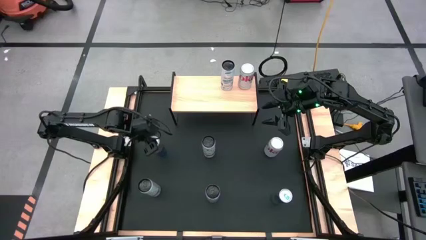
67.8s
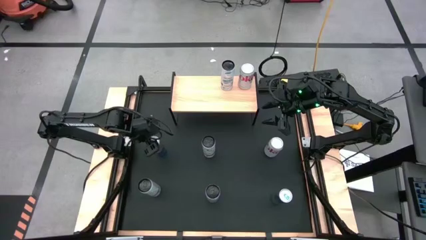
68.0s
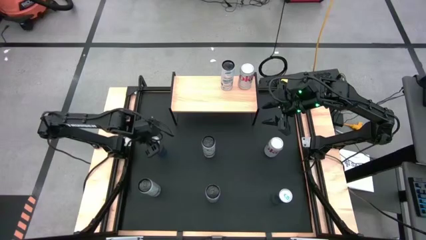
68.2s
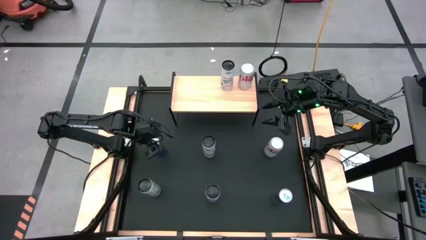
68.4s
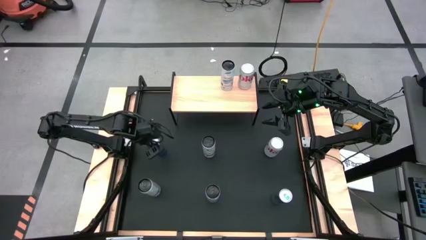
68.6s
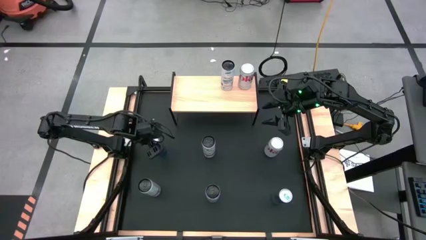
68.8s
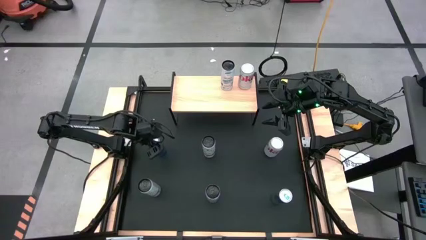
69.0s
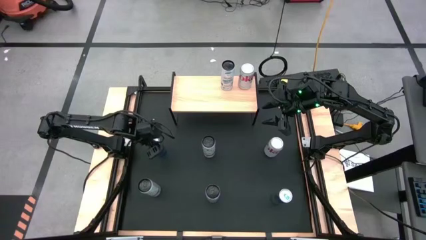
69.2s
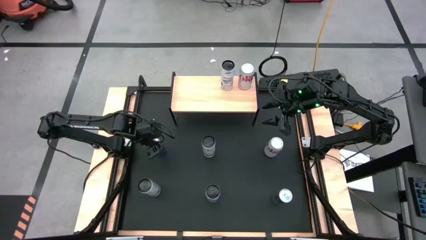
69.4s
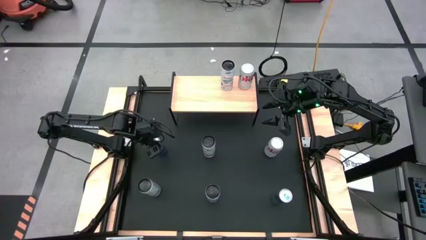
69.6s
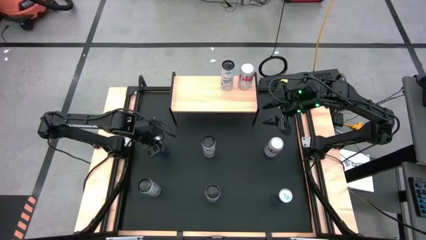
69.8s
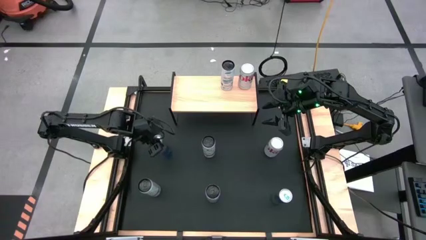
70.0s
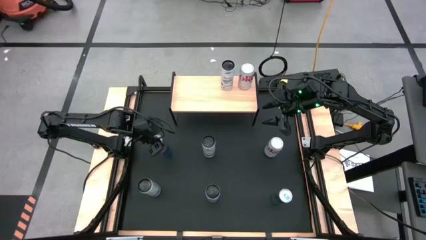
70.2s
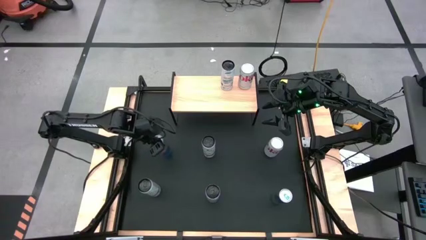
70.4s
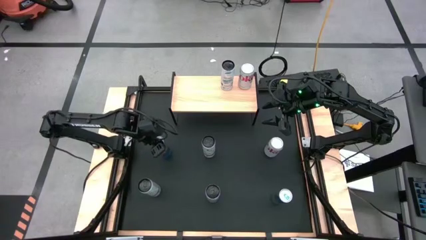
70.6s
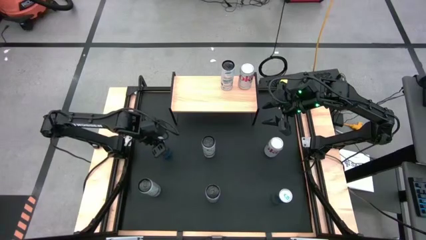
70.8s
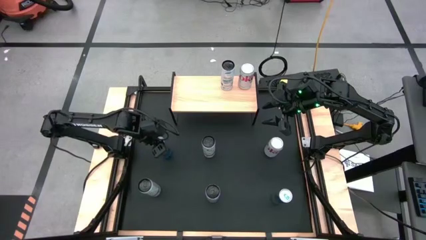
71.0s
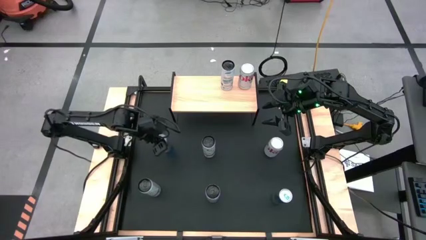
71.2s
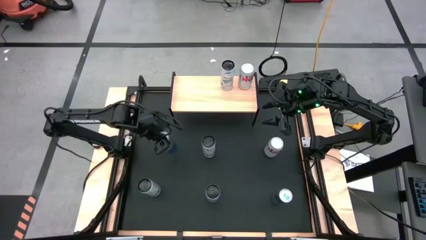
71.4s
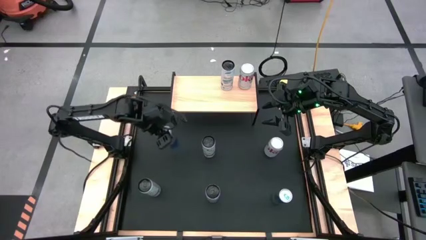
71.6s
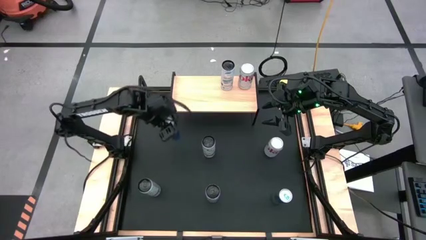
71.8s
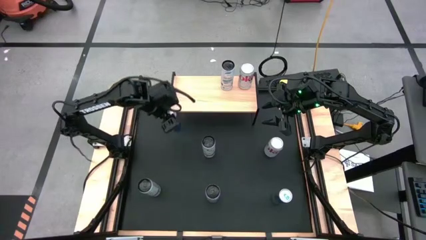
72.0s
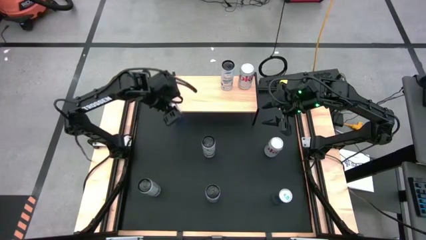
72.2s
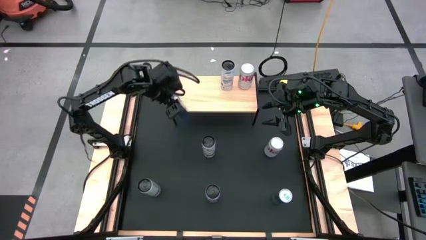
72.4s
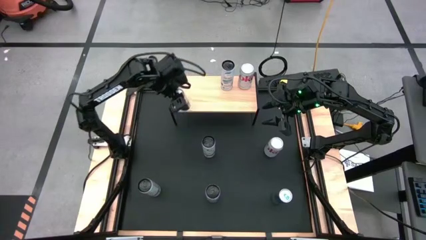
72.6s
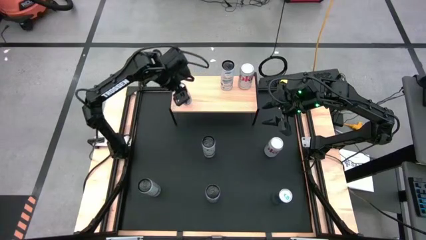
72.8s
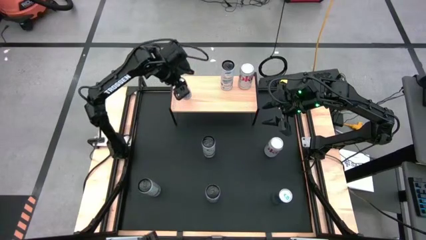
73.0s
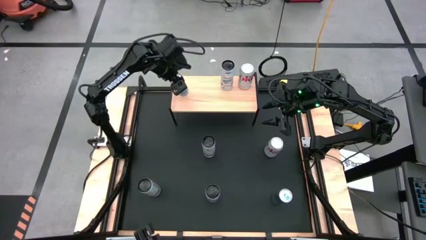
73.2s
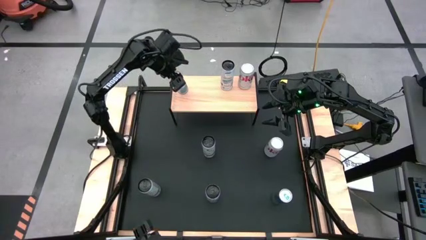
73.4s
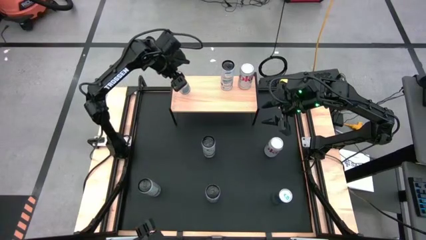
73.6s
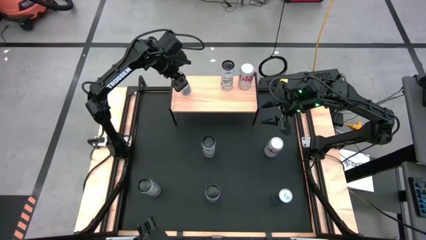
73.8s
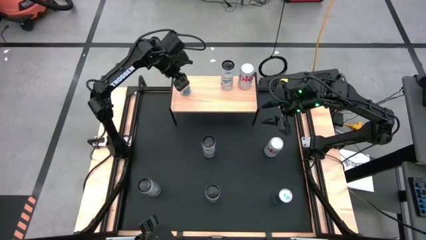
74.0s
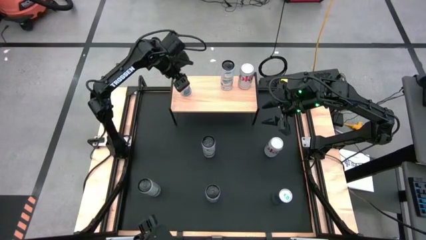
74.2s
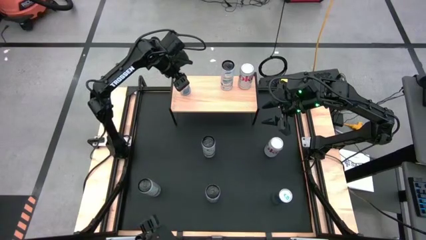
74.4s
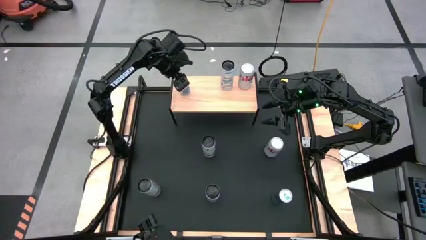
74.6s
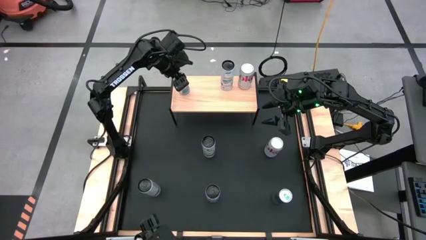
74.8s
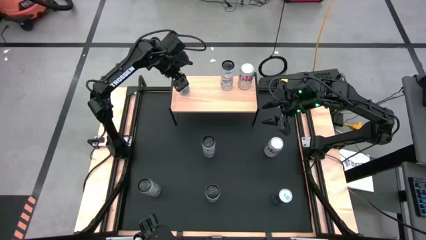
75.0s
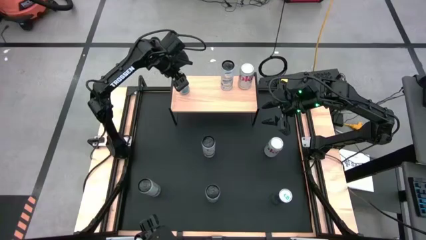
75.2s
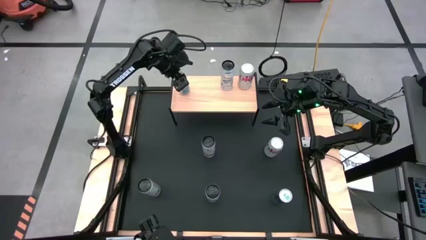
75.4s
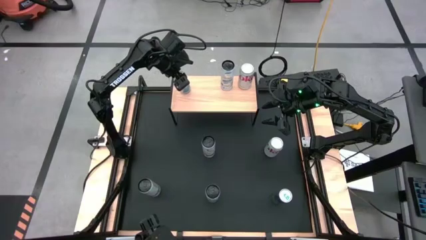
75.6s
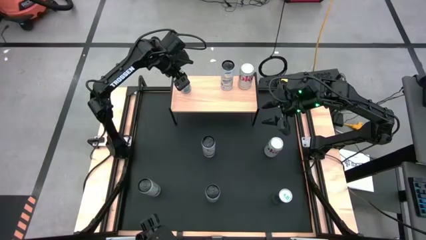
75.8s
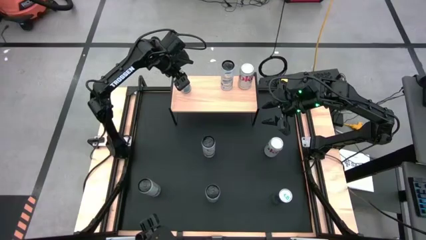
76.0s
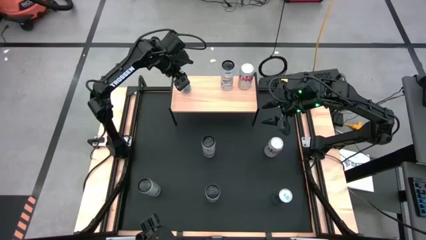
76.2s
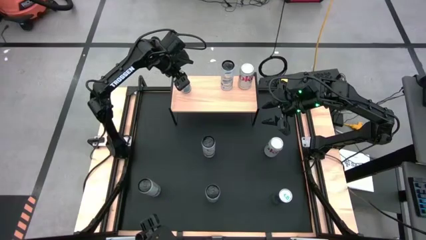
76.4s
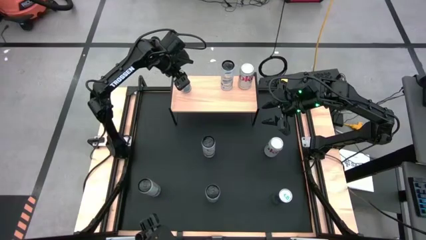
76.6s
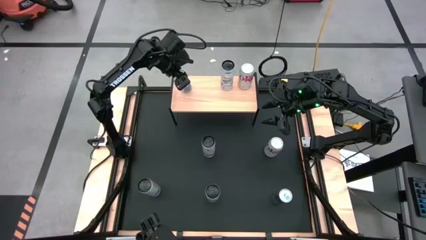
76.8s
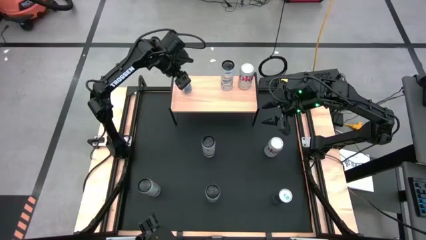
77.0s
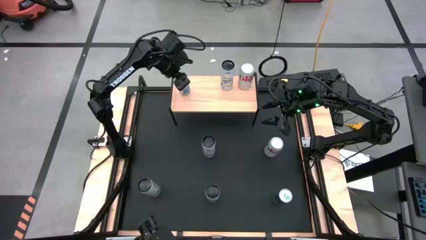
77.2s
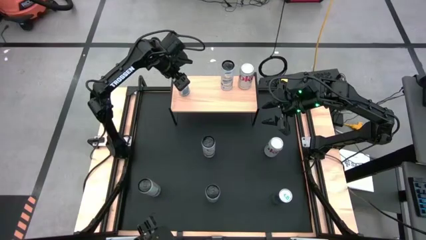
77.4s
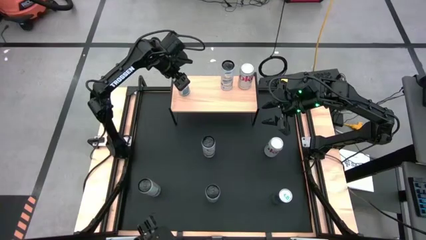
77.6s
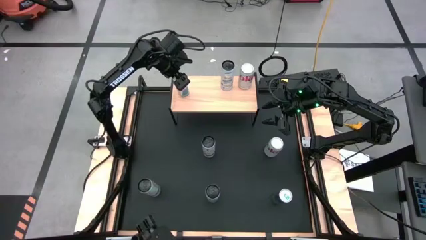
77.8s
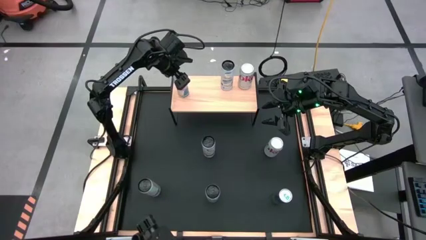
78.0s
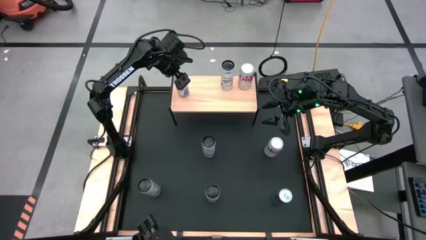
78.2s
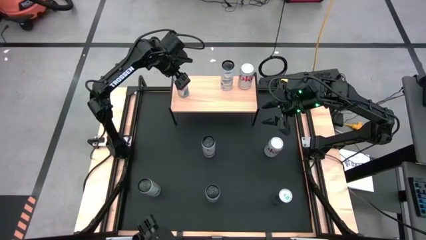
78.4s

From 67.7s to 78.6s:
Task: Place canned beverage on shelf
Put the top left blue soda can on the shelf

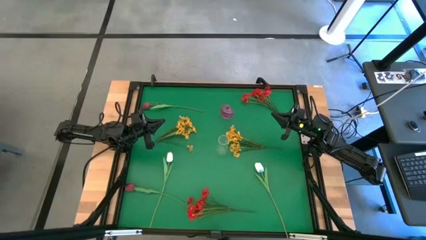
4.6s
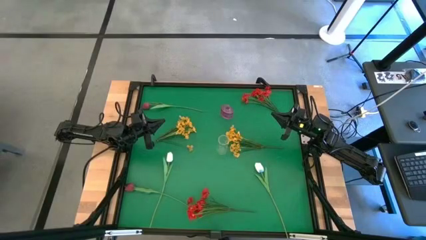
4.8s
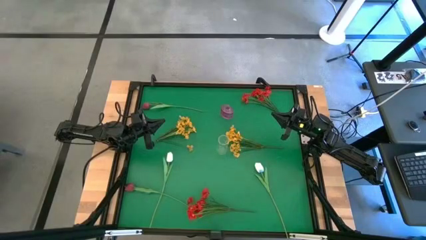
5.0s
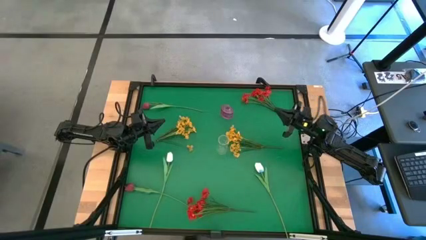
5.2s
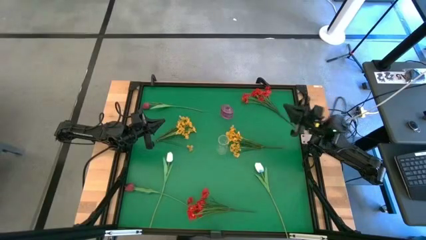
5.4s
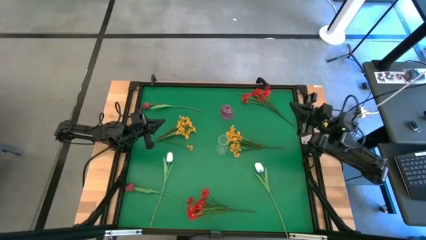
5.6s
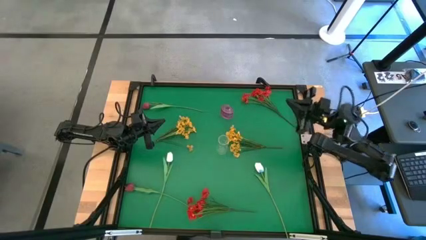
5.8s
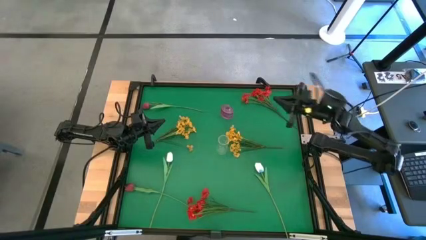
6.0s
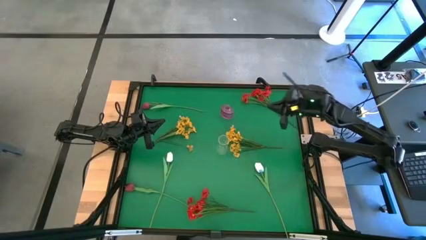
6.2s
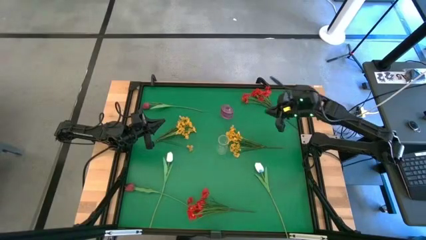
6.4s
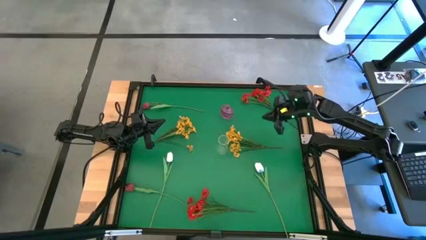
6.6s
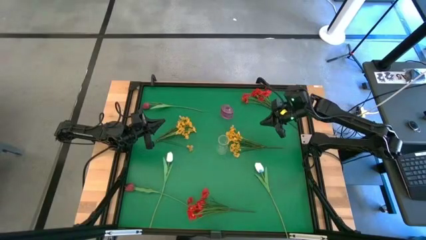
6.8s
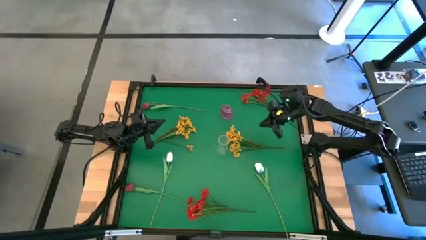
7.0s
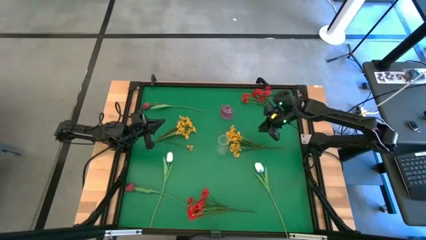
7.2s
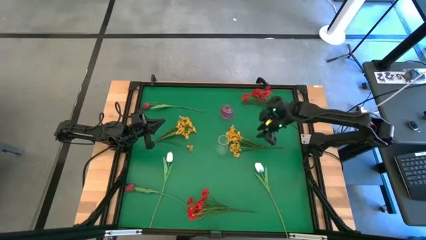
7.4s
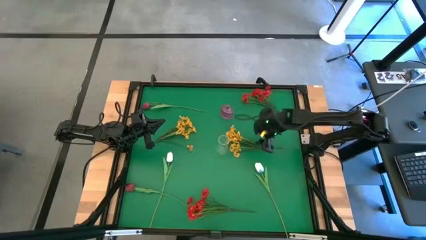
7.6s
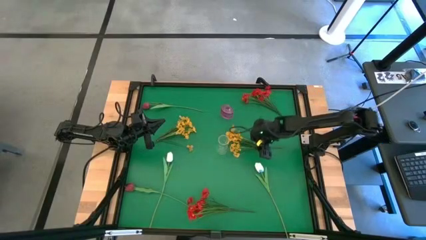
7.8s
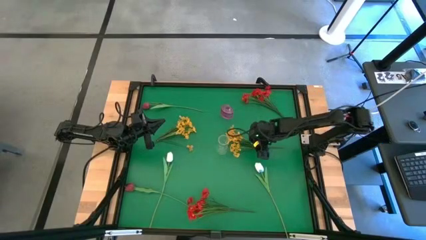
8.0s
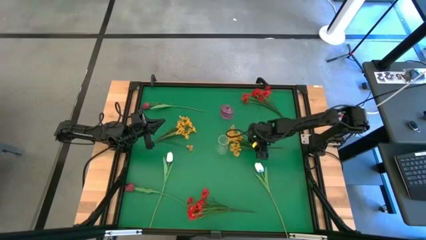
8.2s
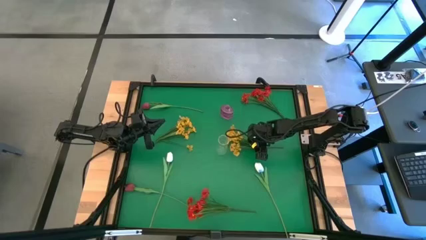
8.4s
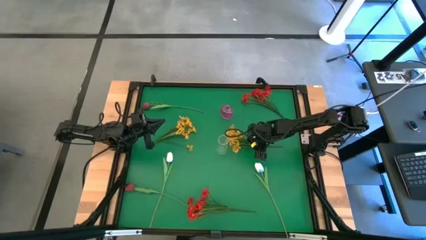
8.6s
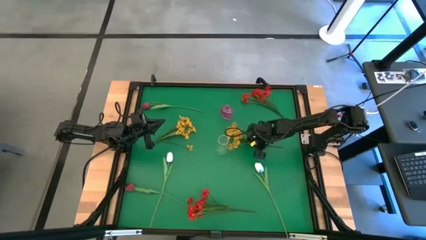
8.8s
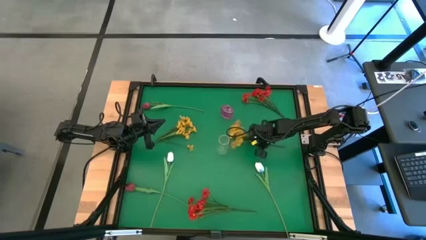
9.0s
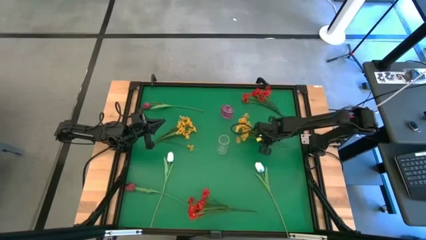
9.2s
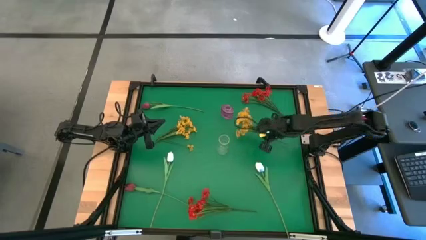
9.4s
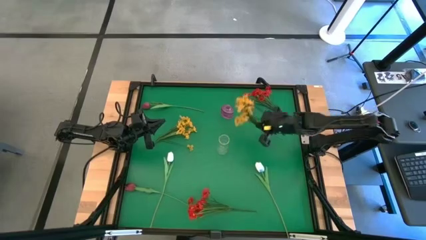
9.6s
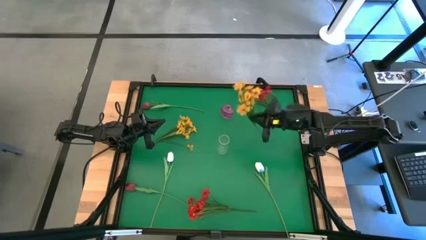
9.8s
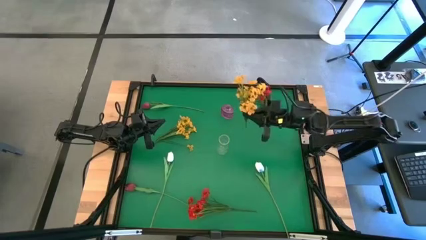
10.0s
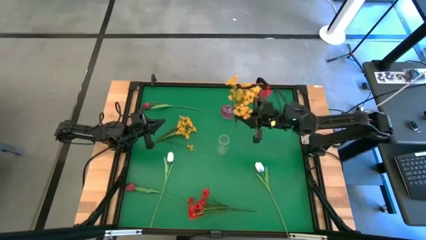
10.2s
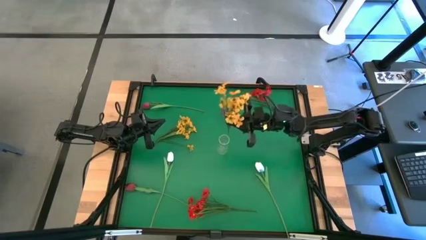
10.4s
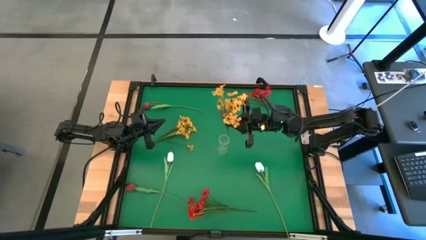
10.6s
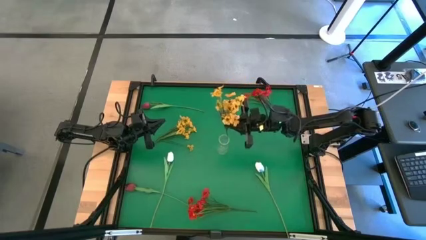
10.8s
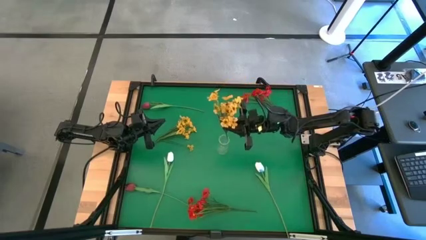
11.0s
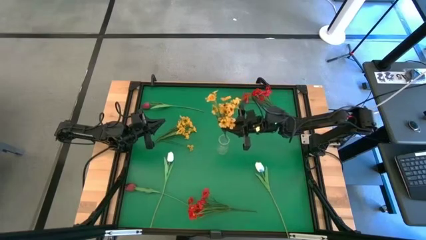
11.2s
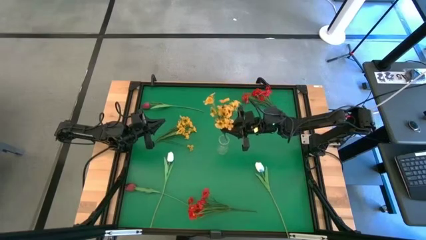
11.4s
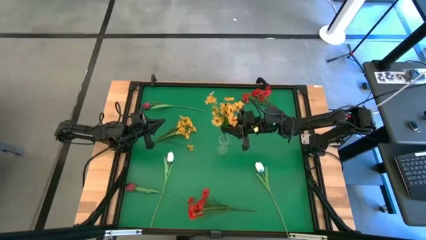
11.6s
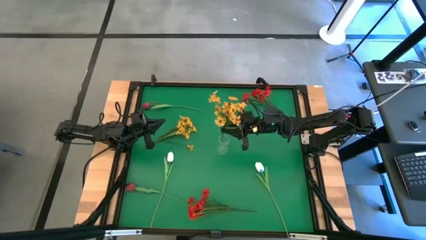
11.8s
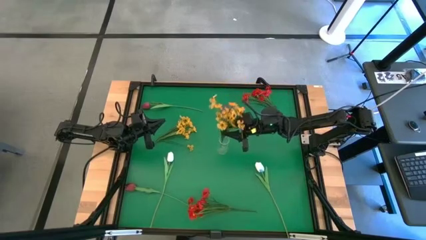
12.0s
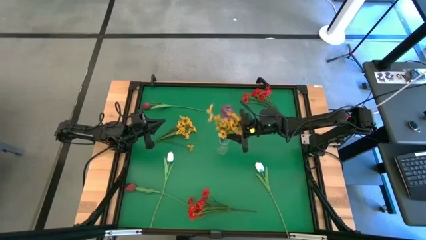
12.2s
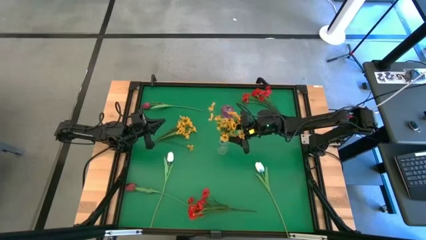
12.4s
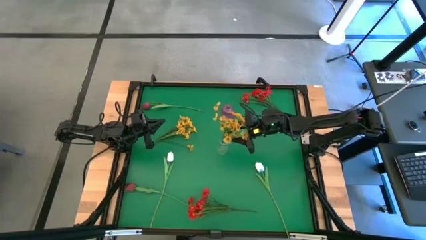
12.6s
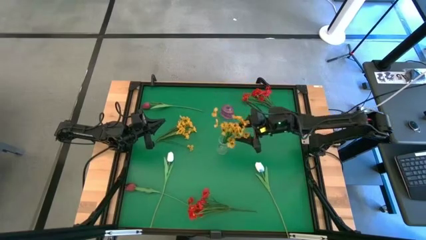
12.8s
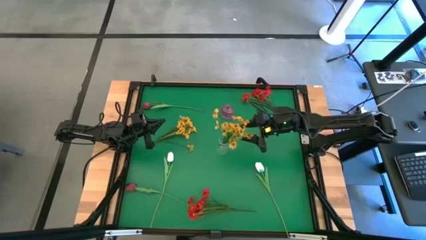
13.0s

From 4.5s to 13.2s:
Task: Sort flowers into vase by color
Put the right yellow flowers into the transparent vase
